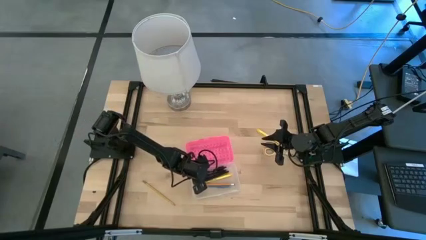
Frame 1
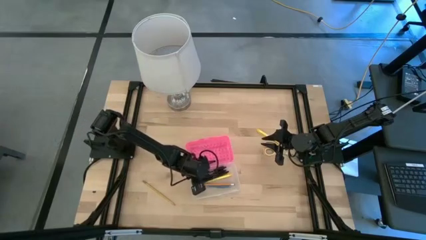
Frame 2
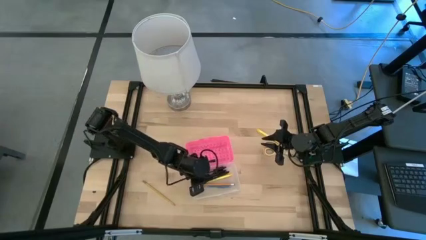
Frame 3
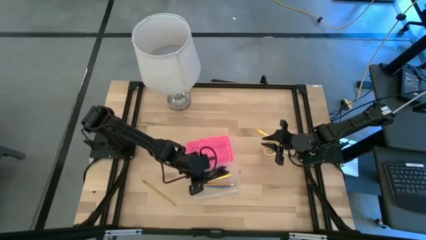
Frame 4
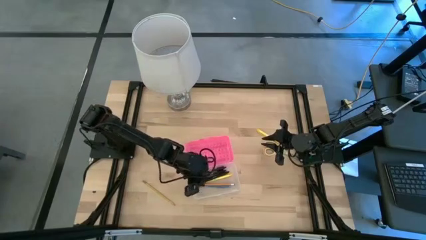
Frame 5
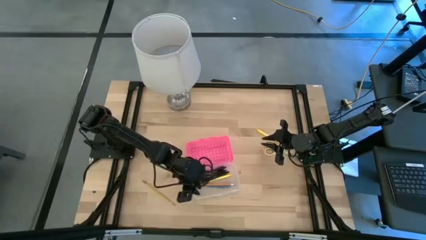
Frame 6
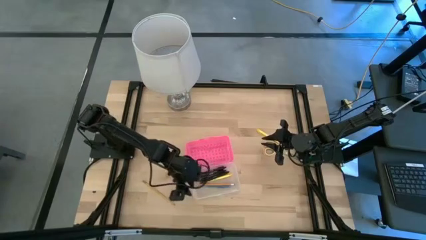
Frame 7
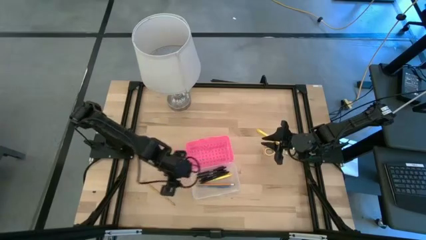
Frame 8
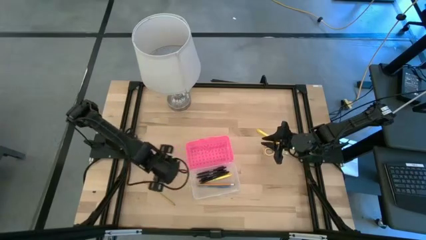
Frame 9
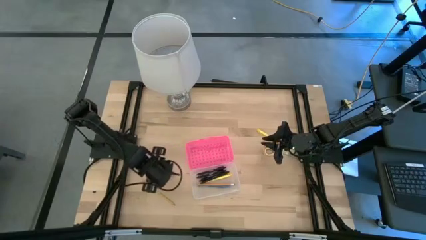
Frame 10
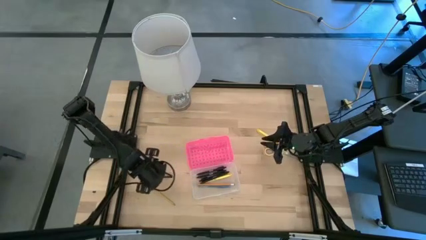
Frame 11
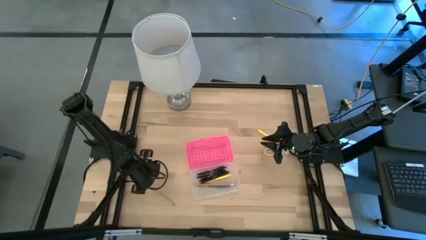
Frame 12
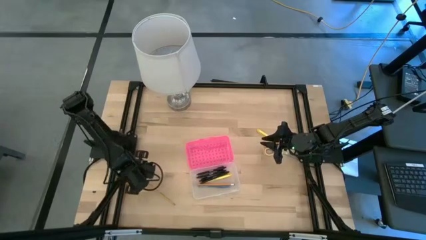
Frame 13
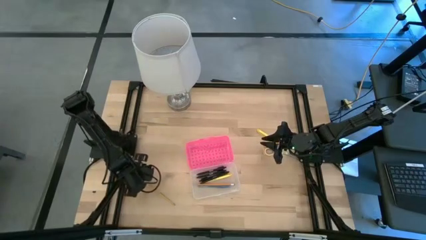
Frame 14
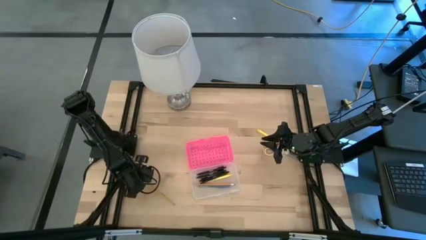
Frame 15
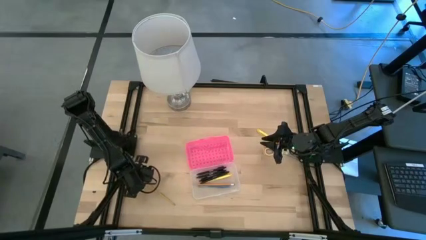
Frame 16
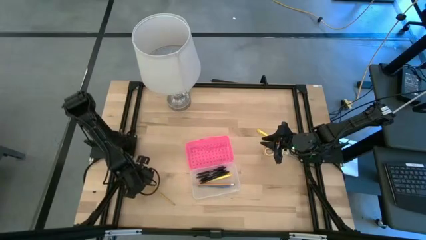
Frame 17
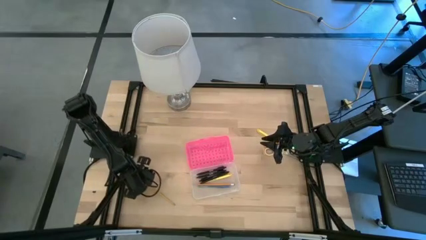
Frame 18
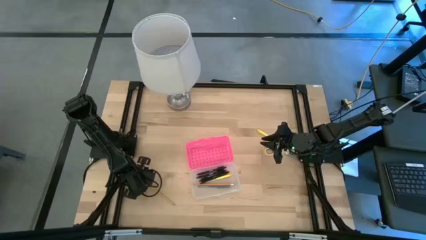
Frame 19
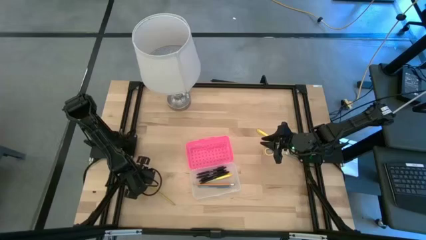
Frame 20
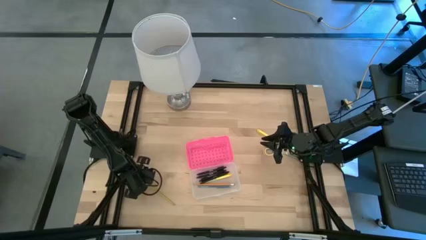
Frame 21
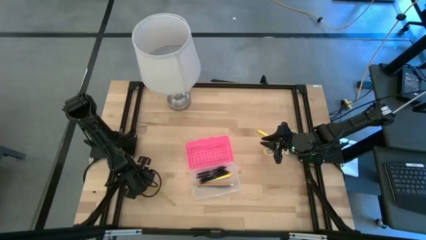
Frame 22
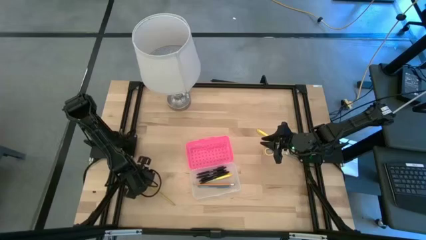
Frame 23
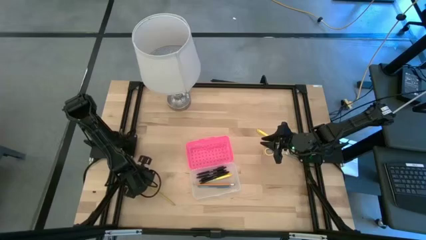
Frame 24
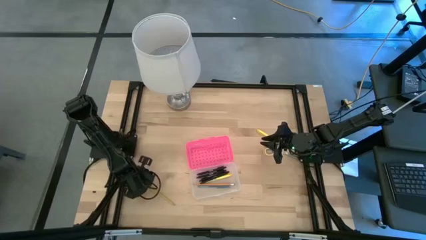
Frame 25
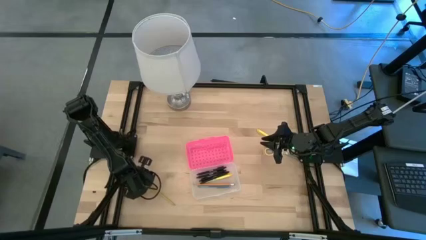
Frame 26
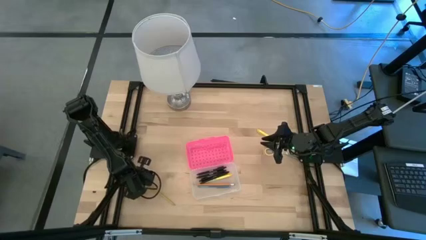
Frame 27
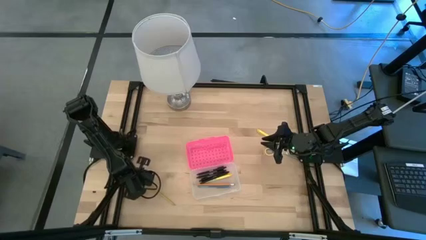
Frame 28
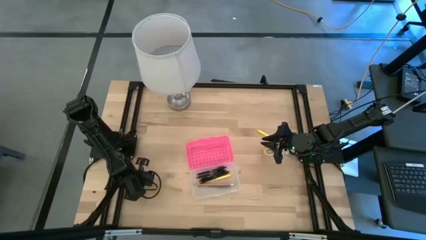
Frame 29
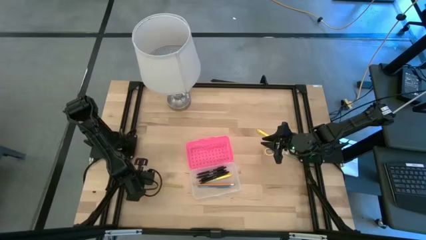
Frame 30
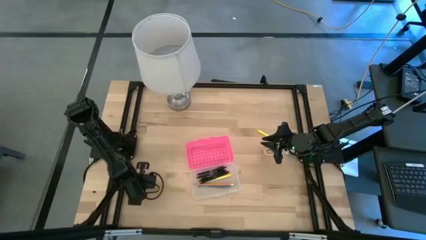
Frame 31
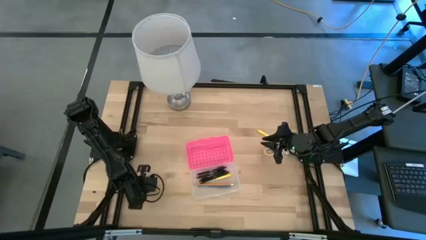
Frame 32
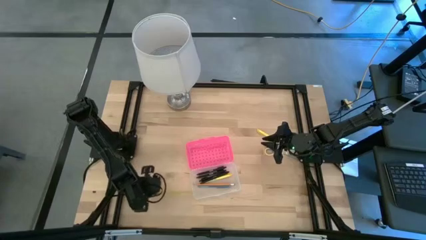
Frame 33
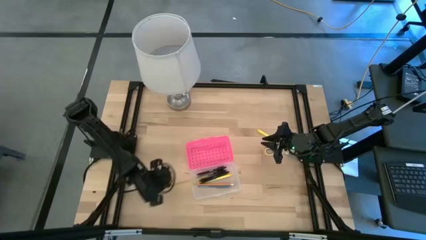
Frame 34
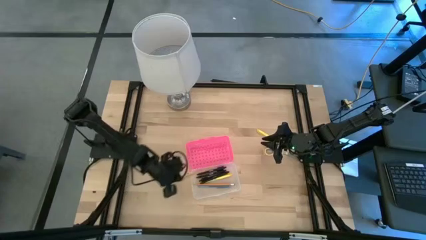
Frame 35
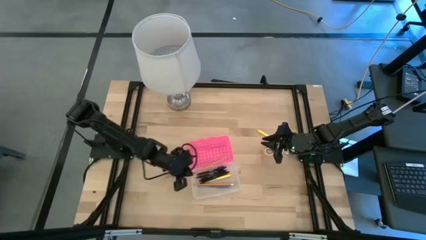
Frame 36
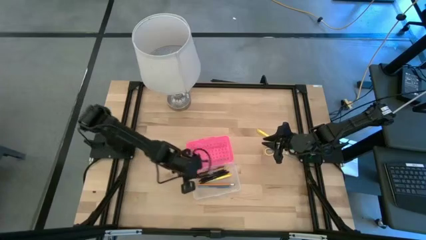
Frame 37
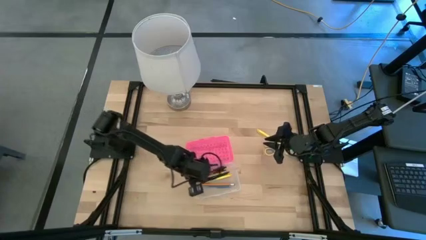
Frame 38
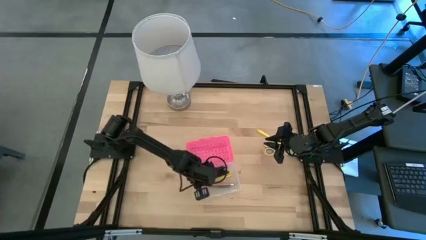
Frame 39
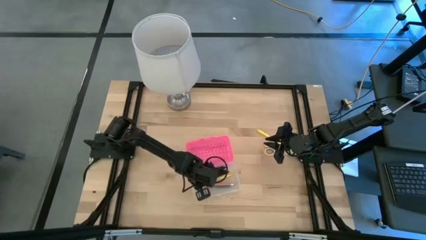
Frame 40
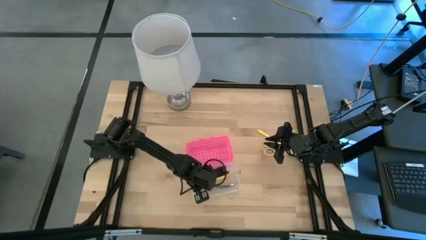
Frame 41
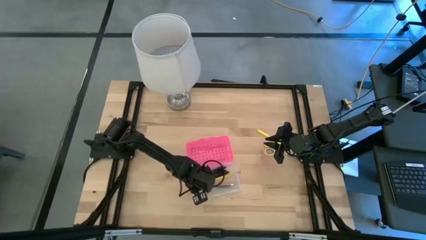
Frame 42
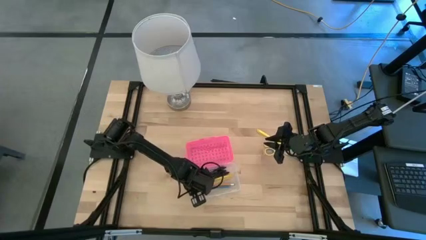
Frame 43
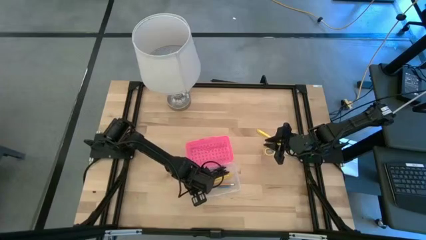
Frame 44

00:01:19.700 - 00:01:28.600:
Task: Pick & place school supplies into a supply box
Put the yellow pencil into the transparent supply box

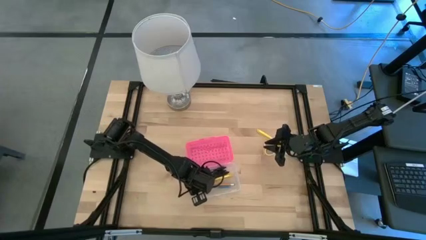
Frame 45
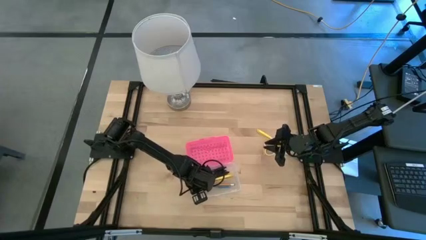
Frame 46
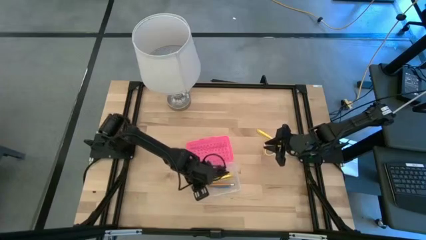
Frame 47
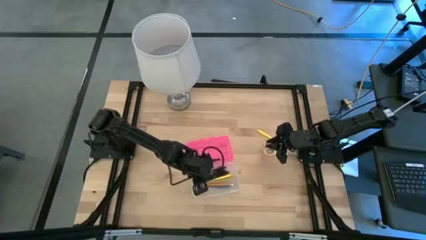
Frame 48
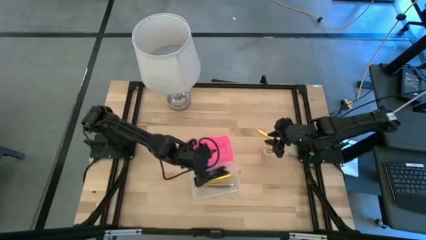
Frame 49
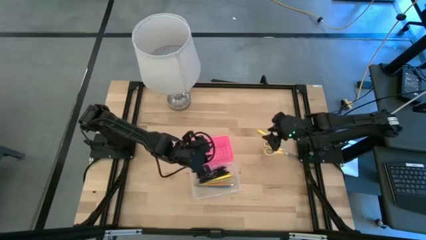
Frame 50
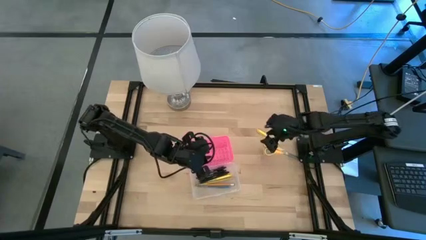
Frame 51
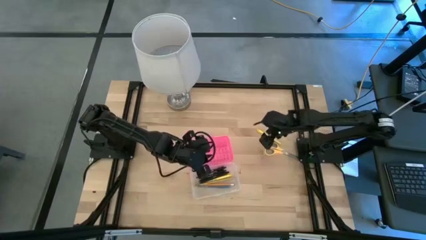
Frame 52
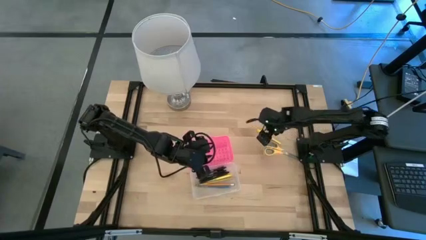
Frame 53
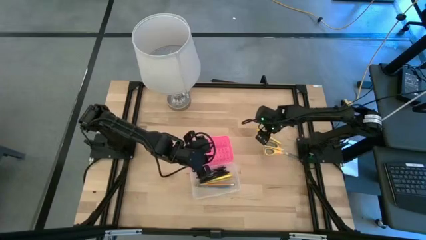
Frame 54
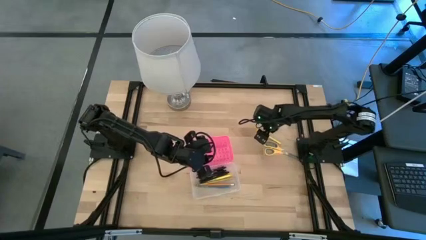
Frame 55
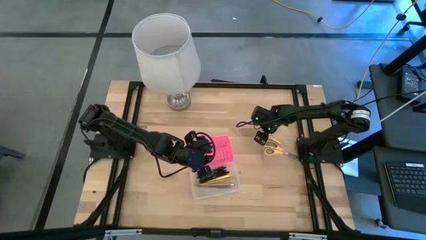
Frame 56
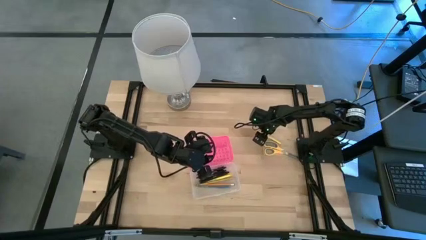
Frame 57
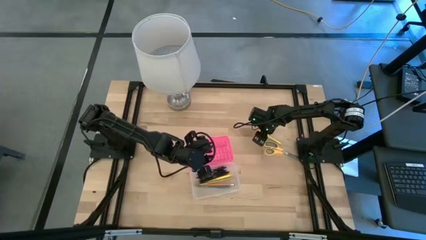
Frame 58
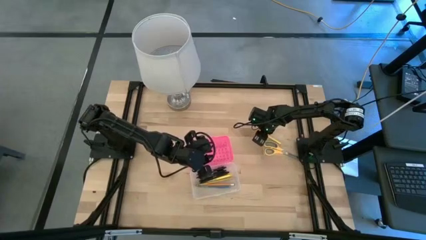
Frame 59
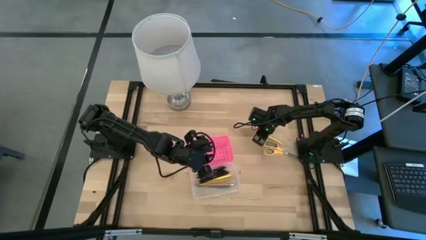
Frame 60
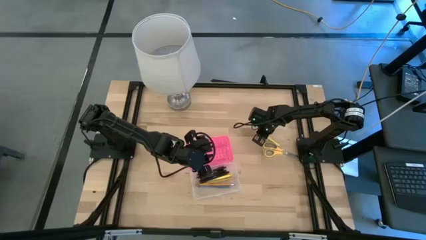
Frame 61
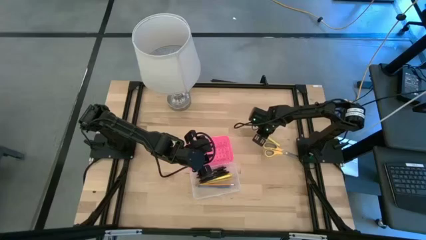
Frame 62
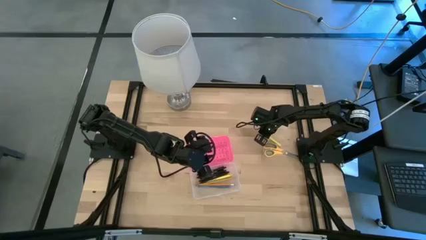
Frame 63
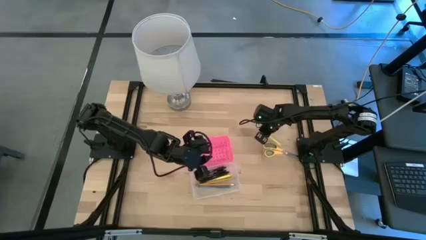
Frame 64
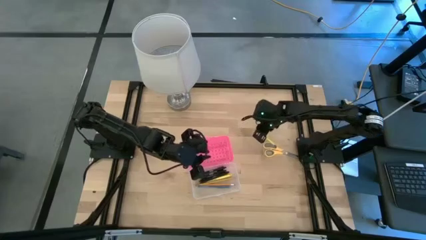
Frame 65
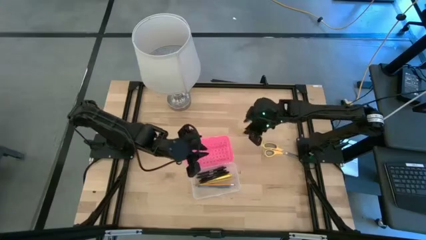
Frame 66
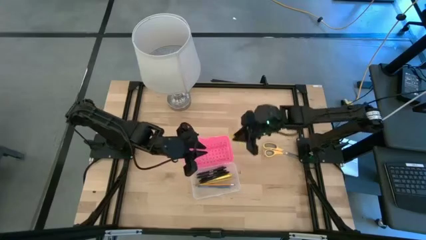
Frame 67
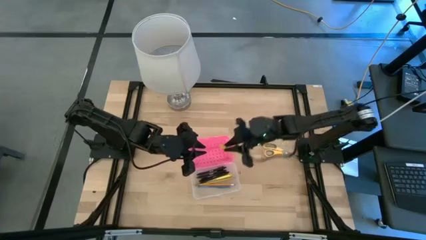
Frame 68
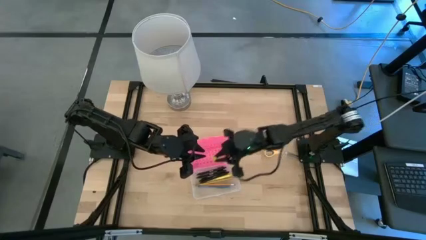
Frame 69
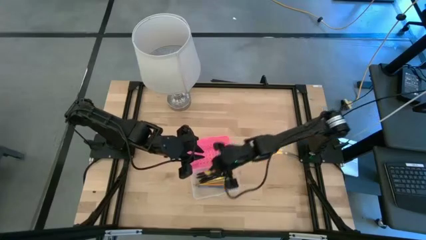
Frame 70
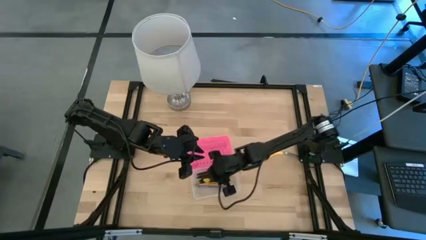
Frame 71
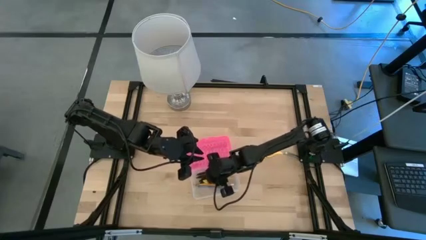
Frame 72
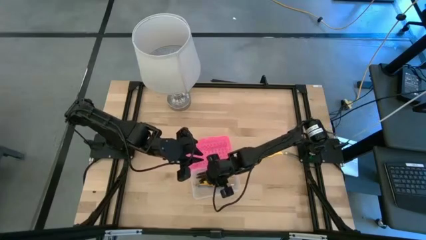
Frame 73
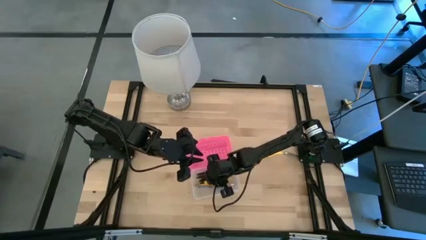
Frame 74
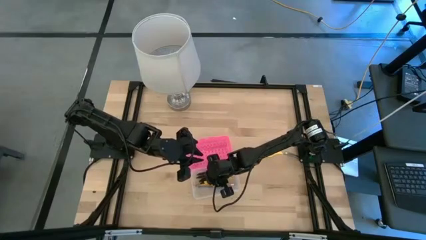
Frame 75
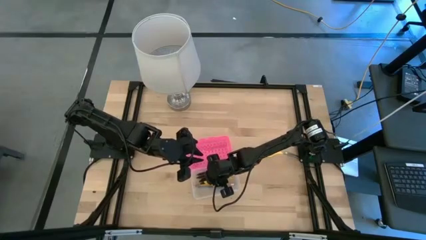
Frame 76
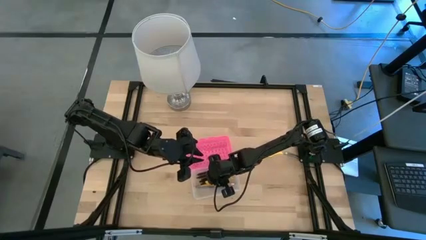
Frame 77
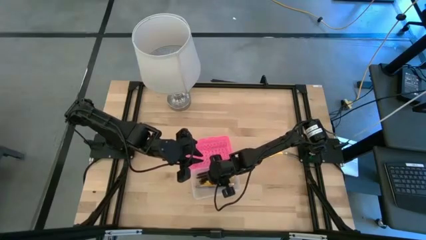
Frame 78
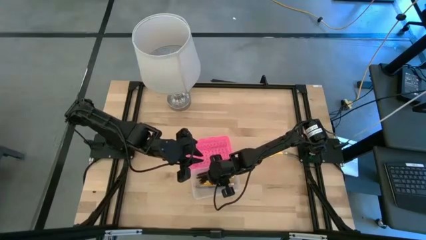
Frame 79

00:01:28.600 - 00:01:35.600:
Put the yellow pen into the transparent supply box
